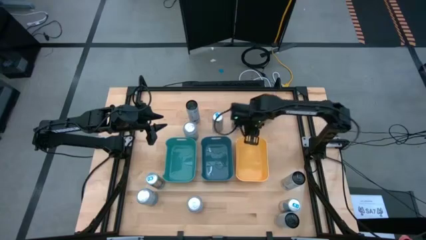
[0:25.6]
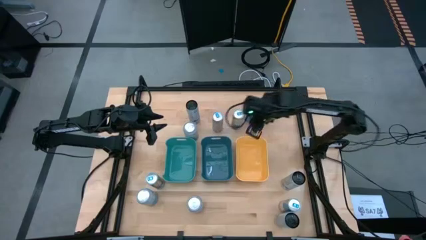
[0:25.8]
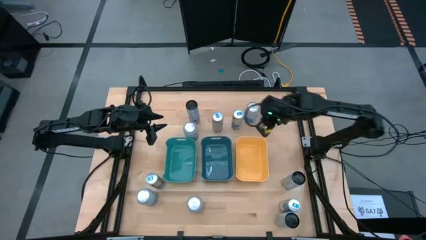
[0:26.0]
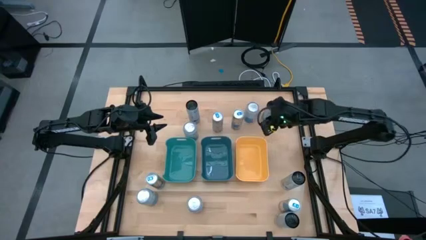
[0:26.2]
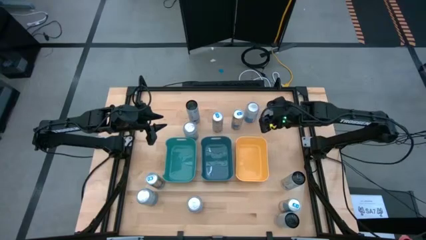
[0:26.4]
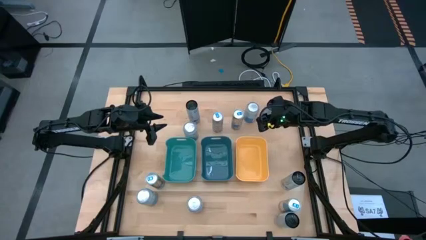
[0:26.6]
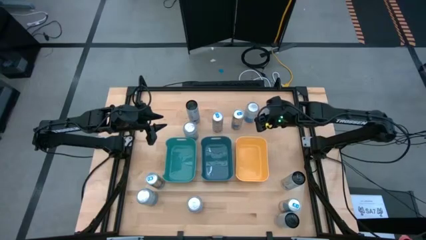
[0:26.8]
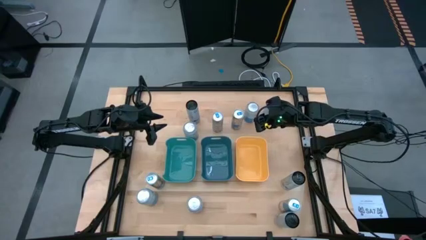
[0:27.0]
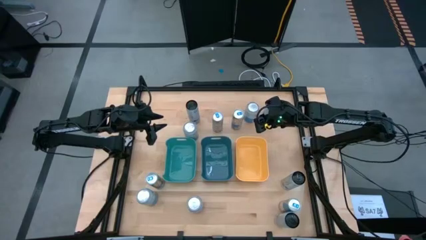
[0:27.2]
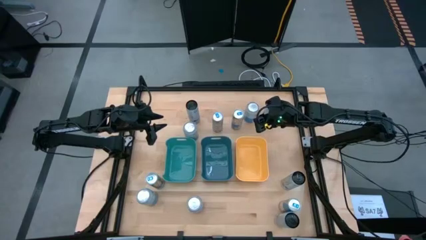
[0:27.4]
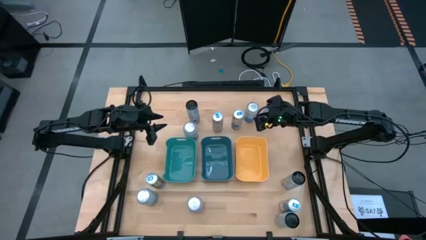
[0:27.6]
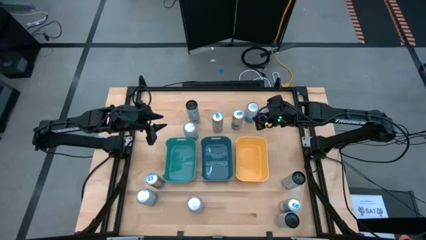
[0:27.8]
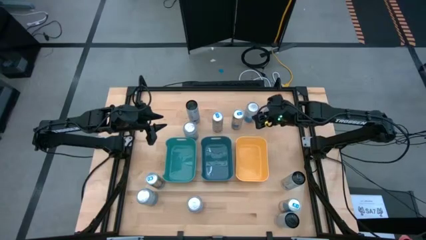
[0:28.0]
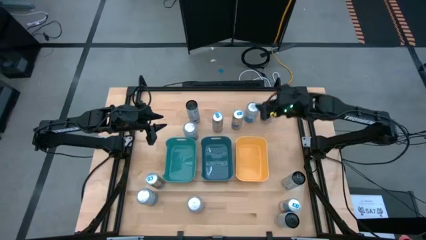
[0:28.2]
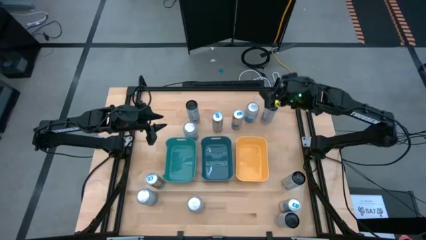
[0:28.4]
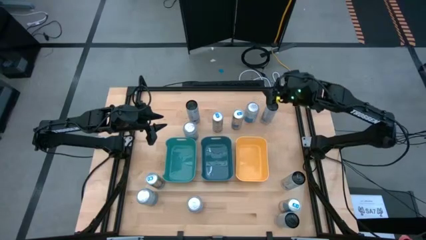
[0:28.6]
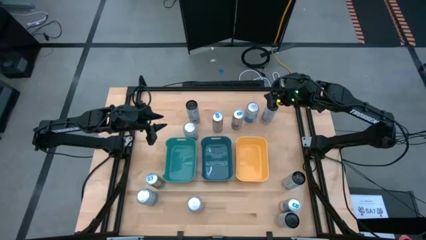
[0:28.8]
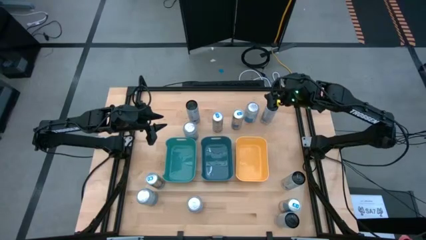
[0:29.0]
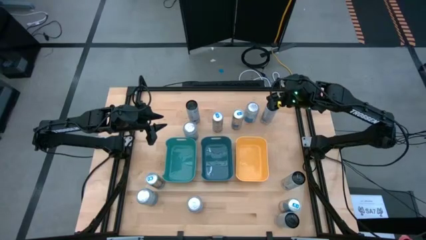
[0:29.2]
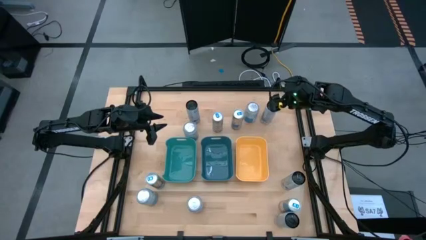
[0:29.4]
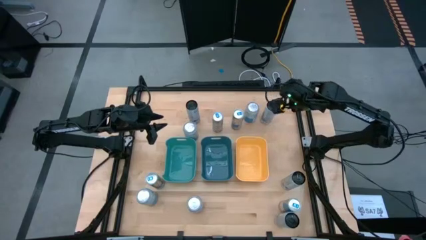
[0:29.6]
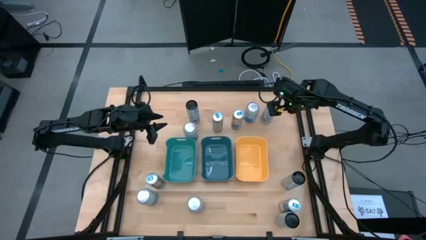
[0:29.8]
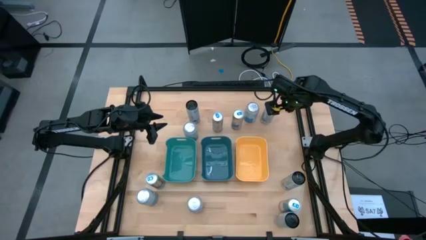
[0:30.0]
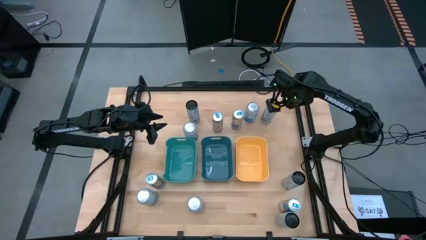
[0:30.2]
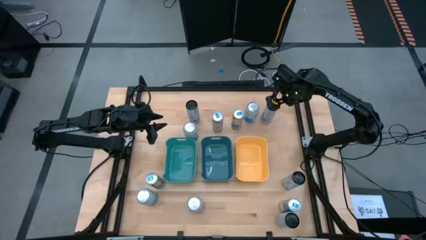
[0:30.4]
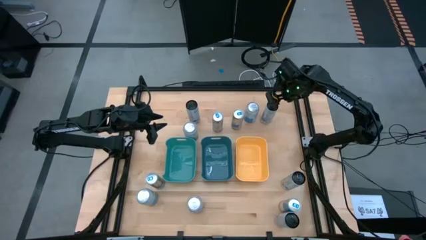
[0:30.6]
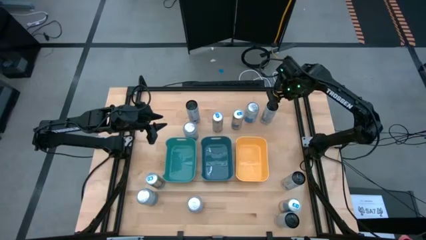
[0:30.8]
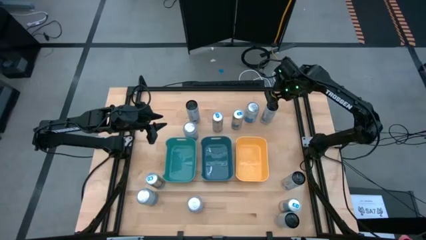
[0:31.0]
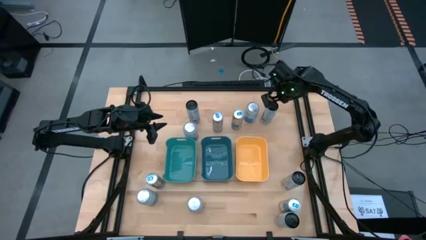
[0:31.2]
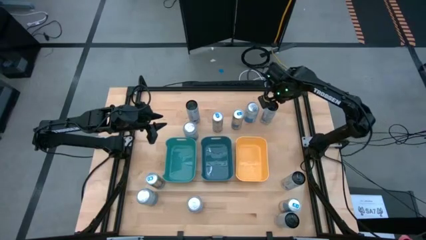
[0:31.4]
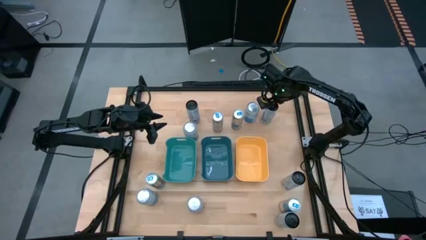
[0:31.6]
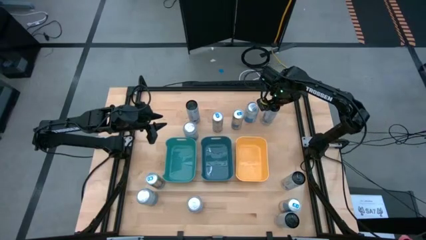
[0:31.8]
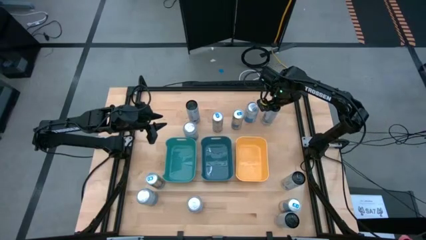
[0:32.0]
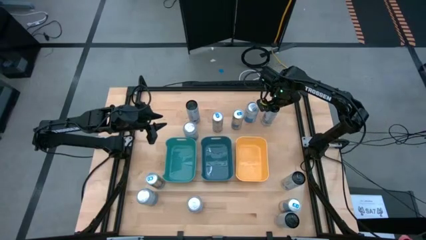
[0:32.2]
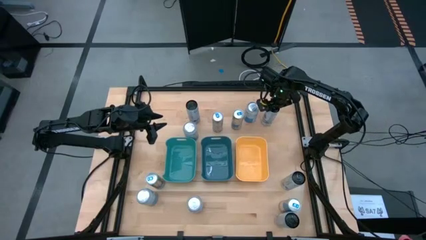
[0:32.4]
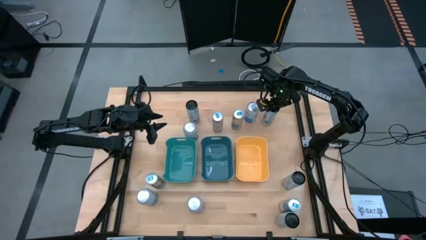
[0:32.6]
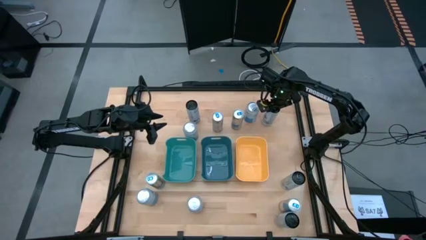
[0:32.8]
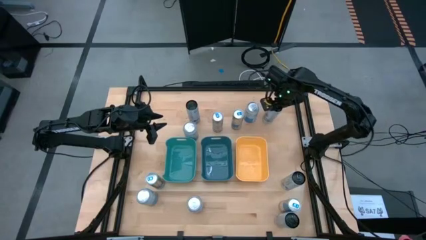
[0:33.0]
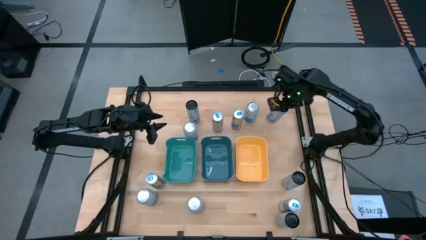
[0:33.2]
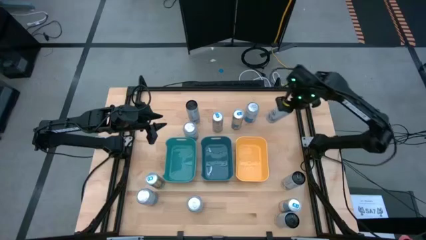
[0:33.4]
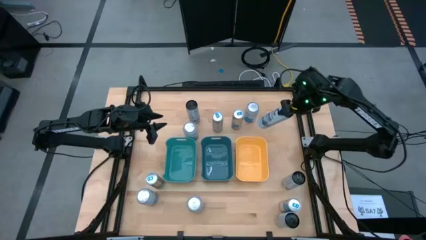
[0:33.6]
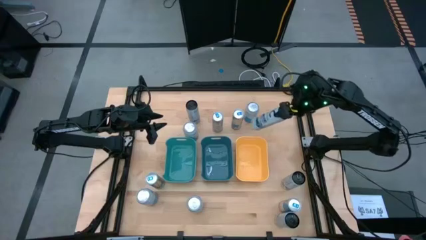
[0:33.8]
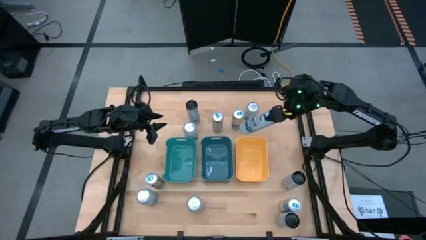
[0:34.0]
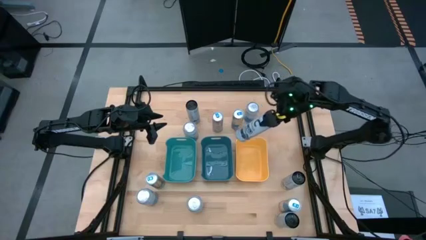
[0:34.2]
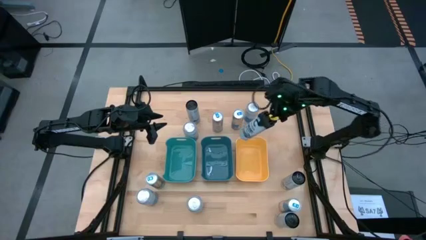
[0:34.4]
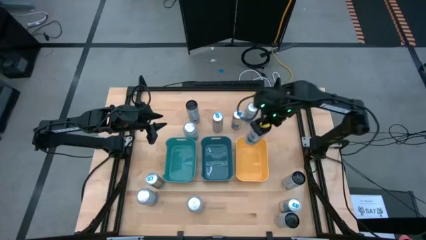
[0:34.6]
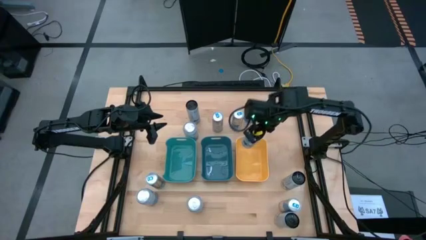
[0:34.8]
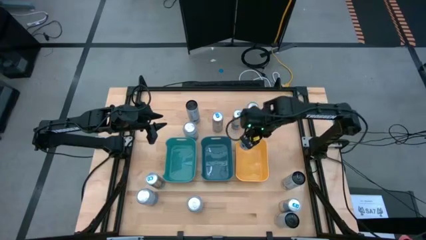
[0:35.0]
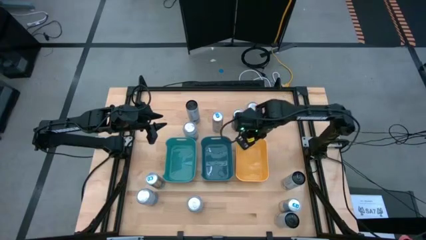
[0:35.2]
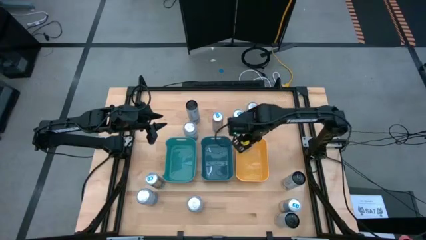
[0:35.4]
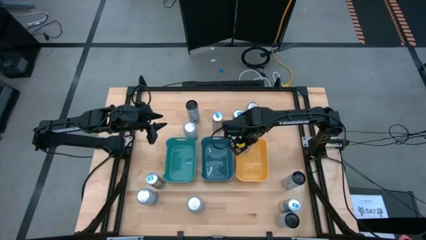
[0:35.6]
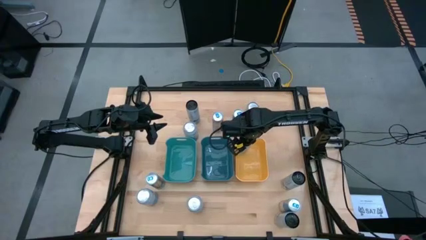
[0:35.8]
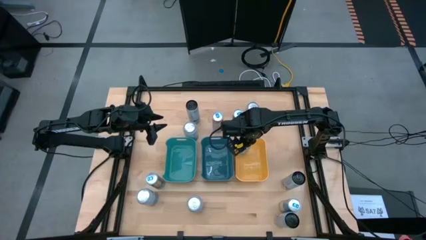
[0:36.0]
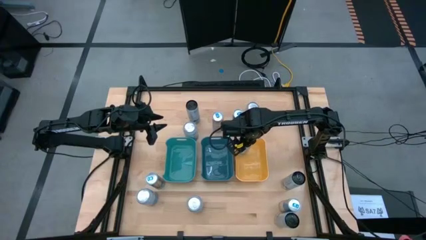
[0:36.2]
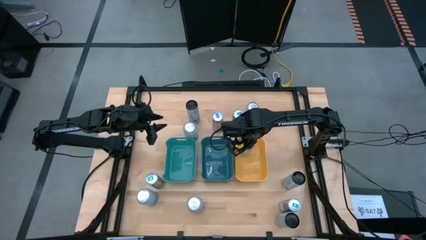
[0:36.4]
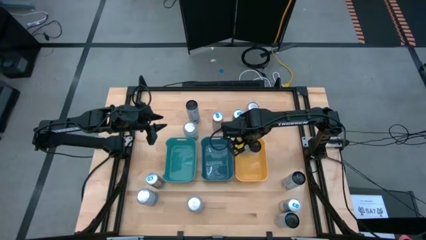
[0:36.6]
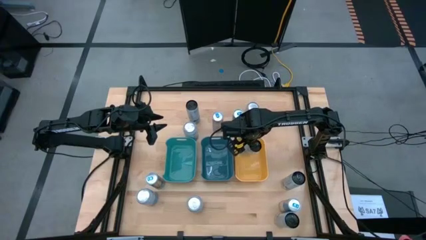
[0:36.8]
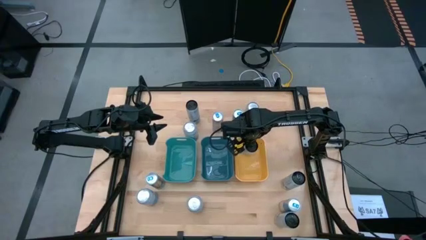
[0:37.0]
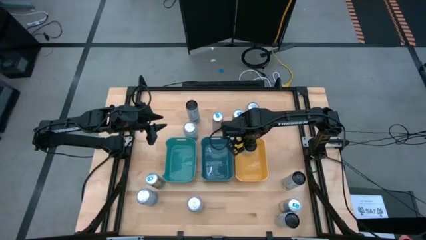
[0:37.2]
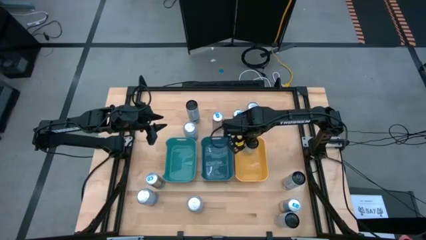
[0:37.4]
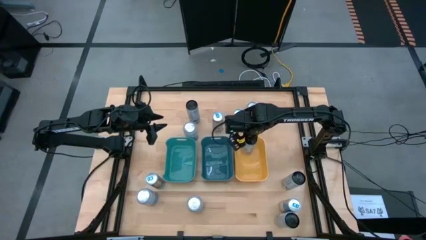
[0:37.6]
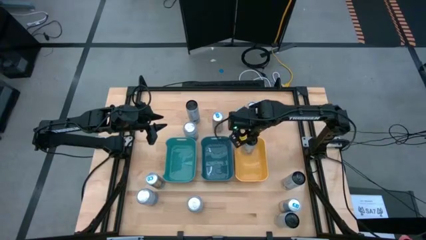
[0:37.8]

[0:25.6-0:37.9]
Task: Sort soda cans
Put the white-blue soda can into the yellow bin

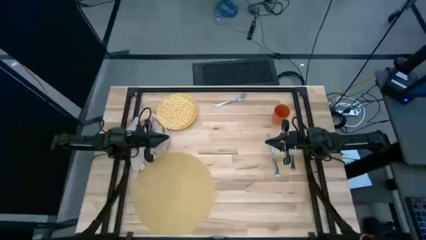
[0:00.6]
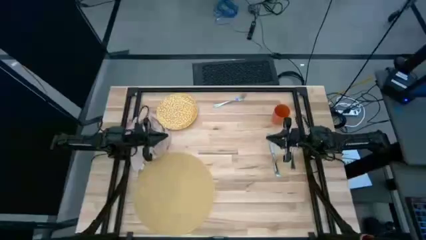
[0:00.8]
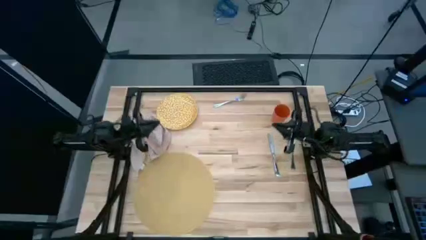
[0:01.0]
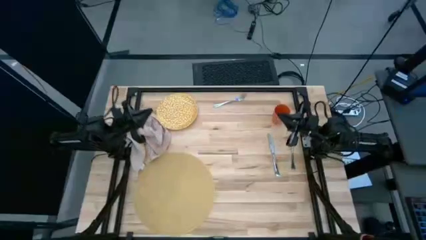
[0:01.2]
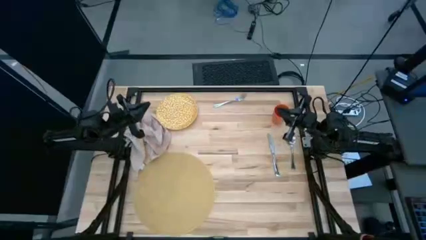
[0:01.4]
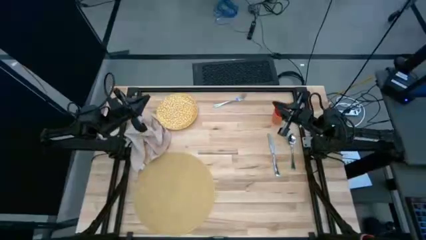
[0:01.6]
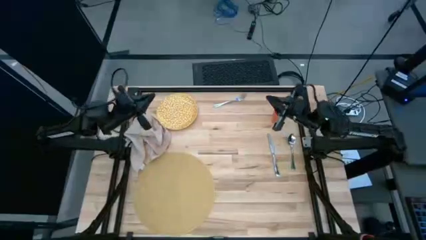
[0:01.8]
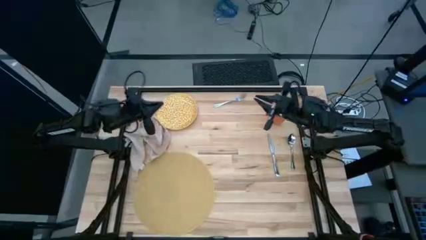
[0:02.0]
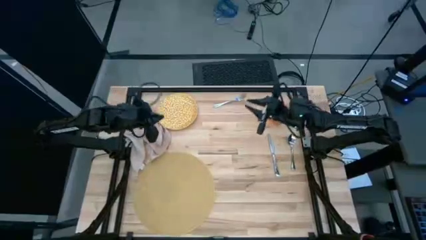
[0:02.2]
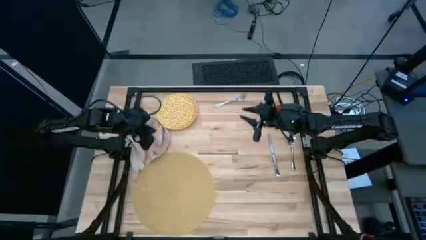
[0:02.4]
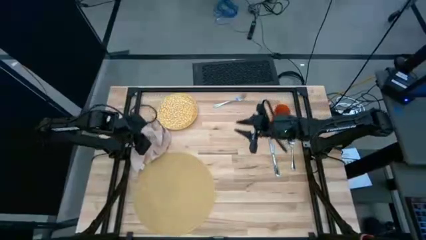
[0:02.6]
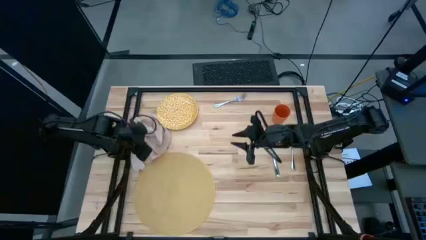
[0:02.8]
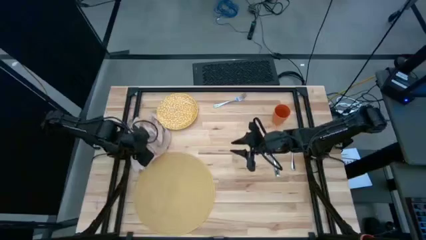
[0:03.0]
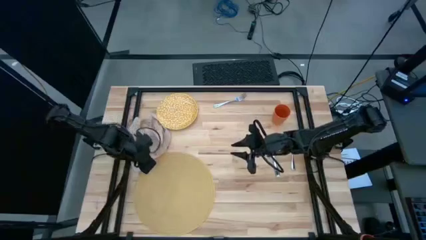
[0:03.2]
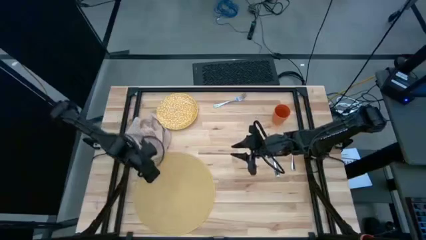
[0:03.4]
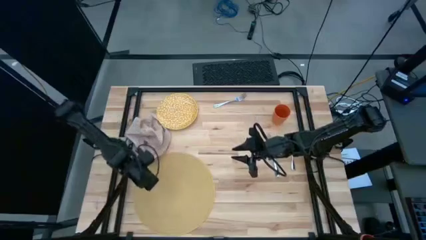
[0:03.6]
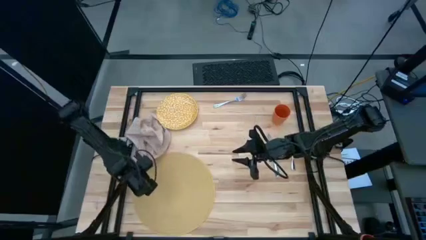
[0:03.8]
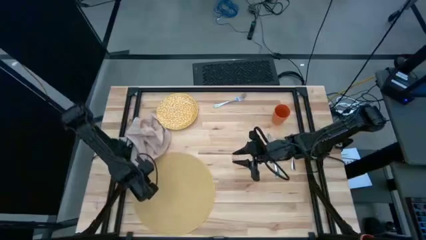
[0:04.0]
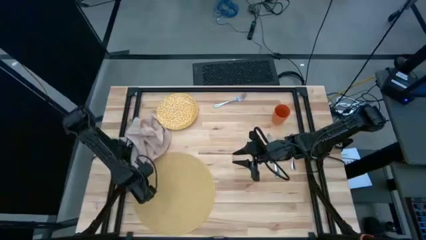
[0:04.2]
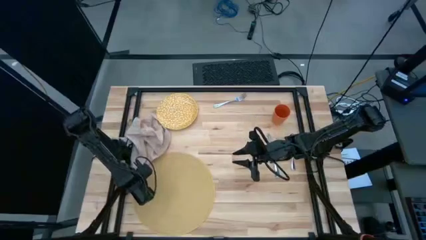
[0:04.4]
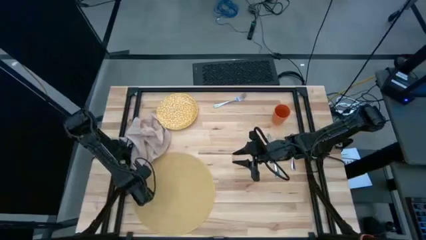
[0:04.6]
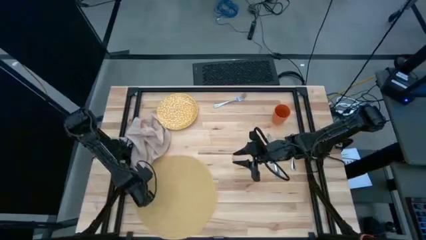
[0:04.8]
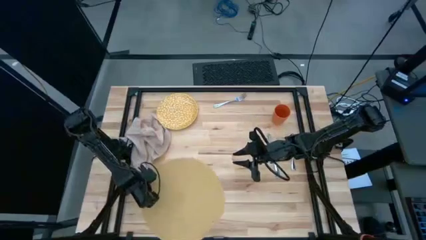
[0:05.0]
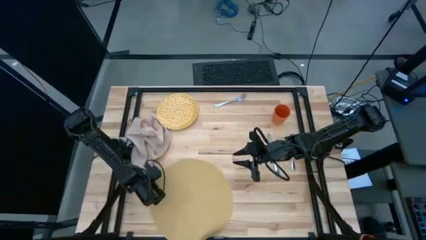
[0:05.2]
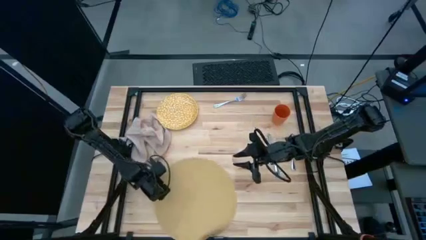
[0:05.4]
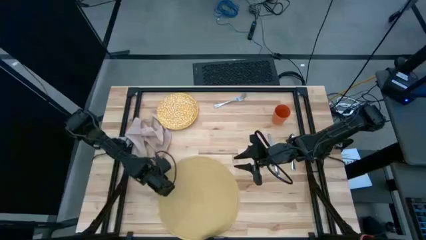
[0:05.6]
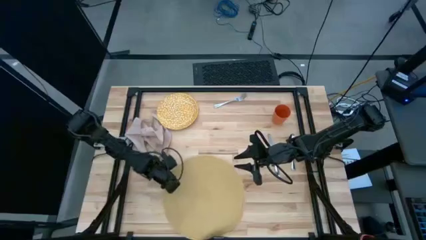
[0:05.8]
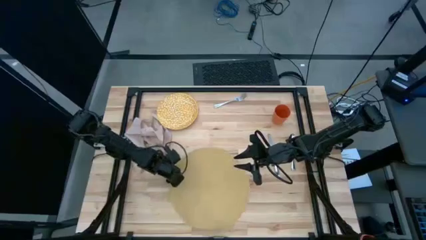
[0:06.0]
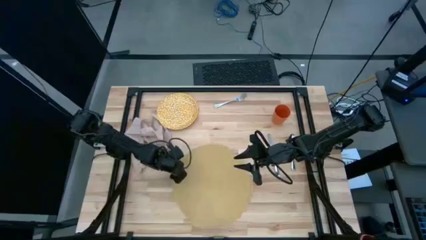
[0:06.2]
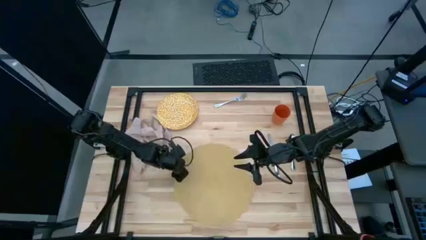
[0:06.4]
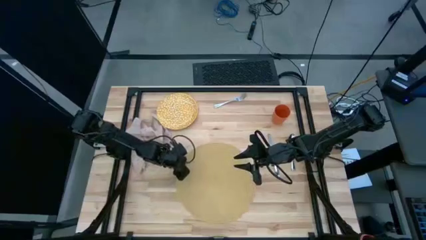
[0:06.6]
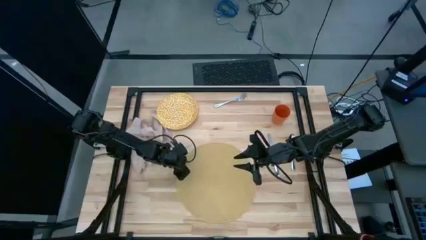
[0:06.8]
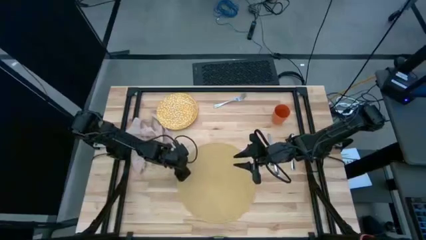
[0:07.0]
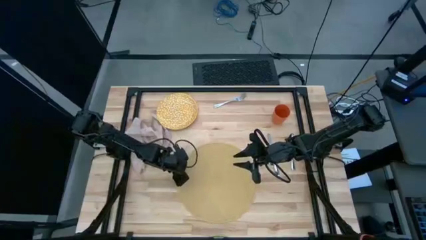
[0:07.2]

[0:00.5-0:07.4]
Task: Set table place
Move the brown table mat to the center
